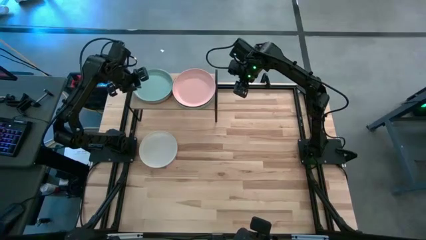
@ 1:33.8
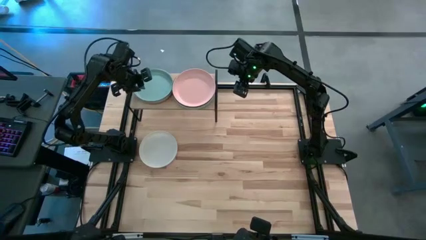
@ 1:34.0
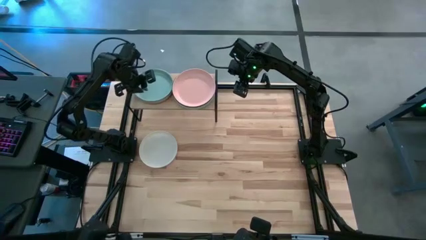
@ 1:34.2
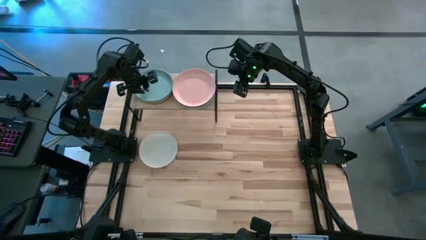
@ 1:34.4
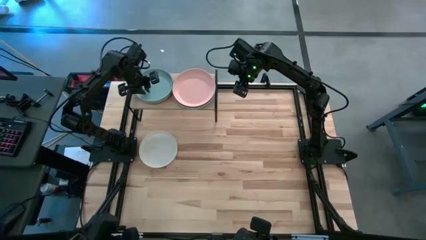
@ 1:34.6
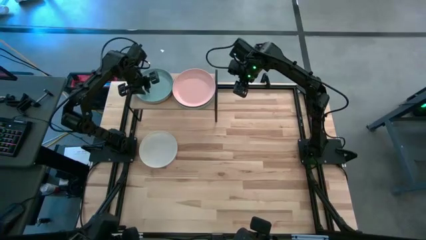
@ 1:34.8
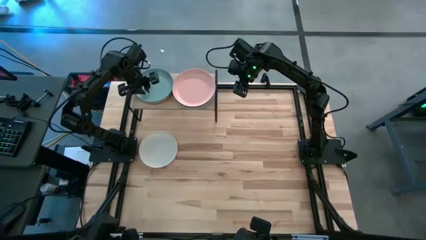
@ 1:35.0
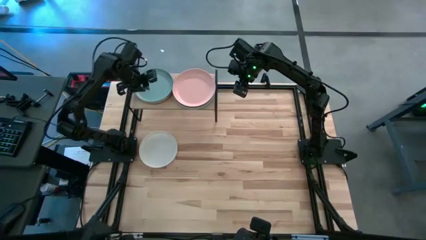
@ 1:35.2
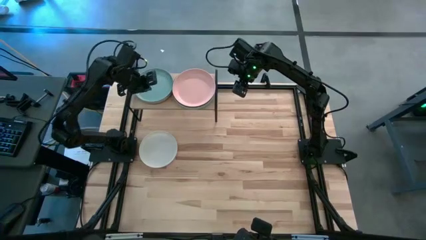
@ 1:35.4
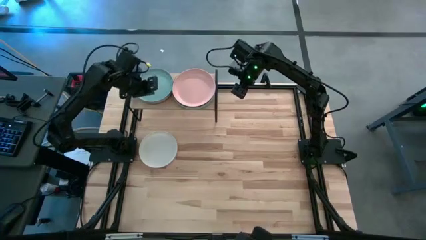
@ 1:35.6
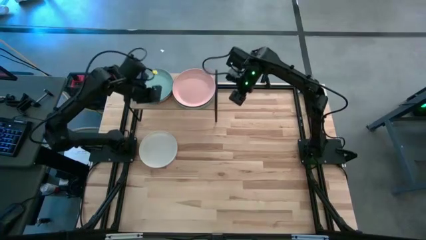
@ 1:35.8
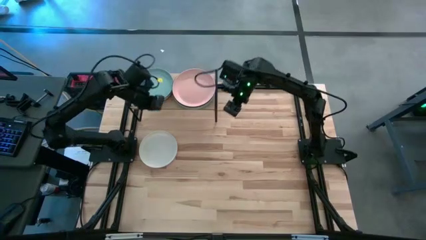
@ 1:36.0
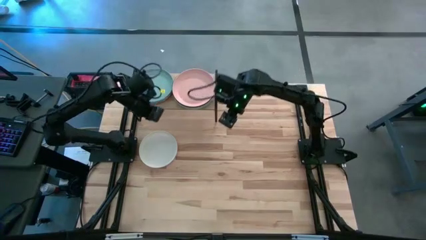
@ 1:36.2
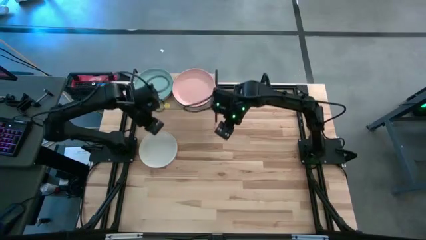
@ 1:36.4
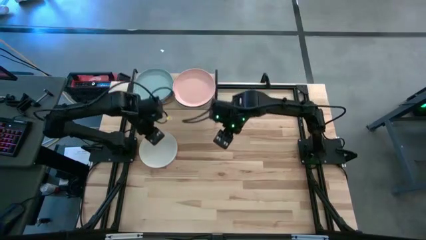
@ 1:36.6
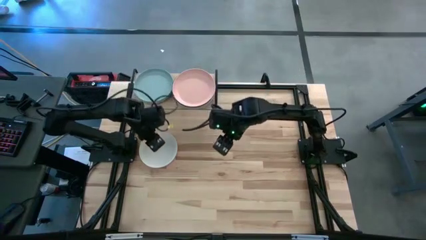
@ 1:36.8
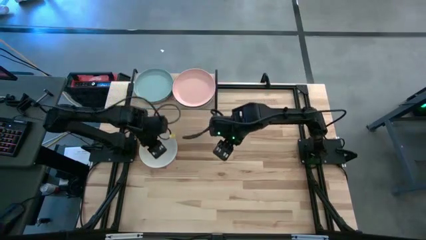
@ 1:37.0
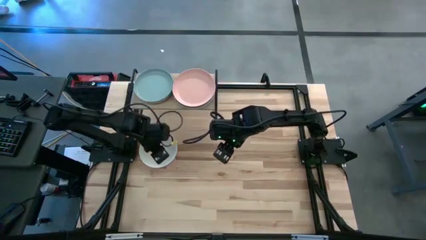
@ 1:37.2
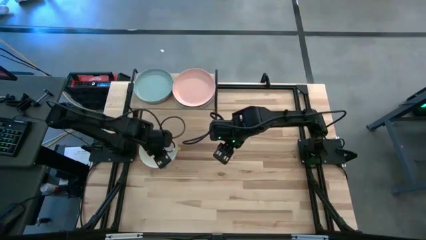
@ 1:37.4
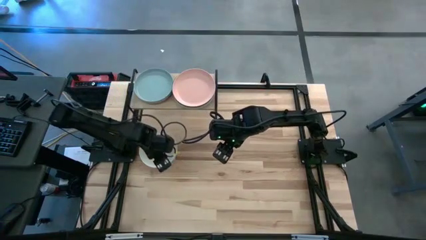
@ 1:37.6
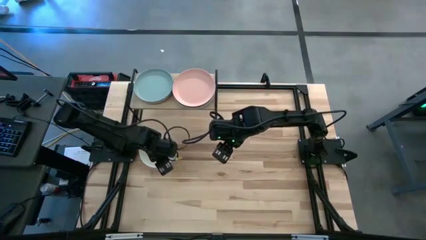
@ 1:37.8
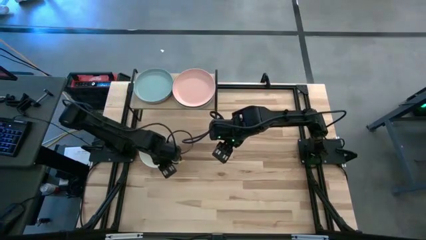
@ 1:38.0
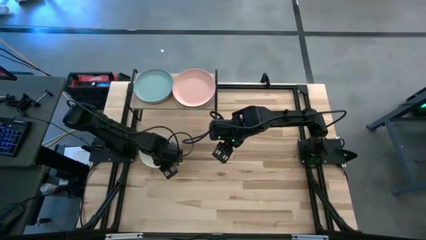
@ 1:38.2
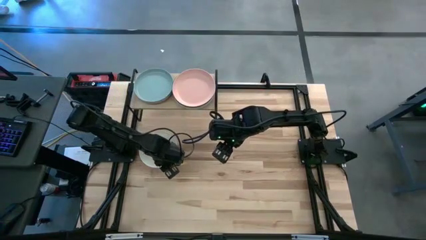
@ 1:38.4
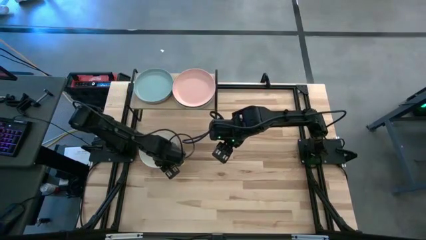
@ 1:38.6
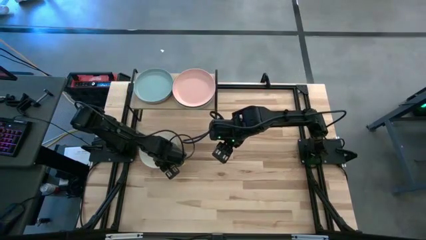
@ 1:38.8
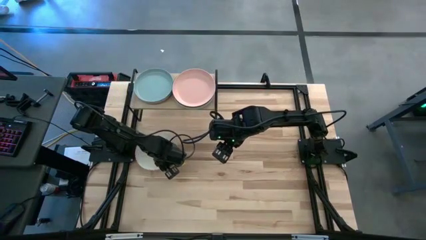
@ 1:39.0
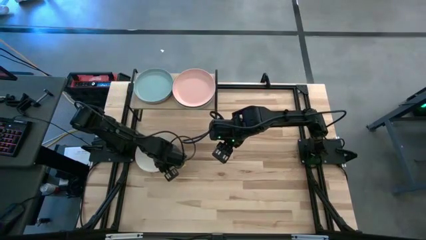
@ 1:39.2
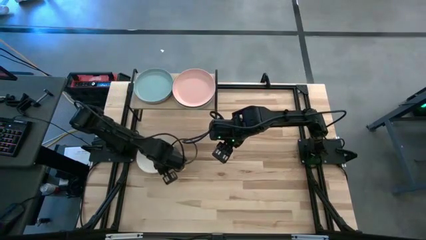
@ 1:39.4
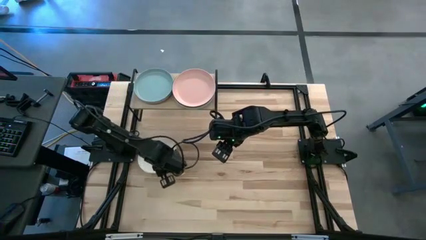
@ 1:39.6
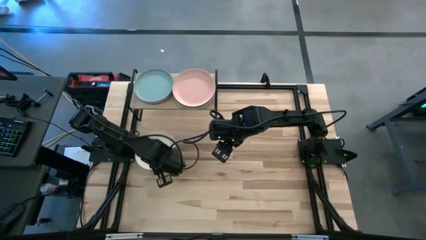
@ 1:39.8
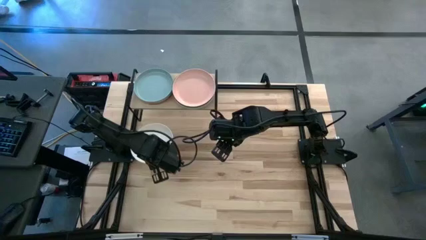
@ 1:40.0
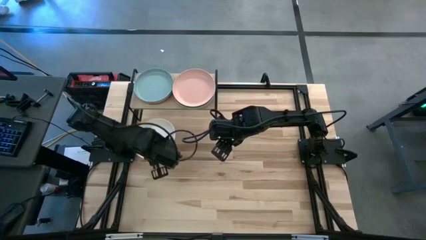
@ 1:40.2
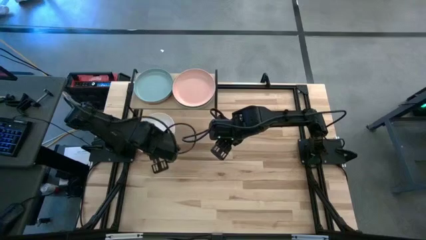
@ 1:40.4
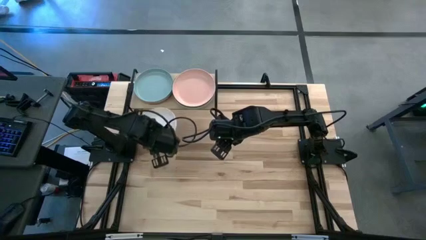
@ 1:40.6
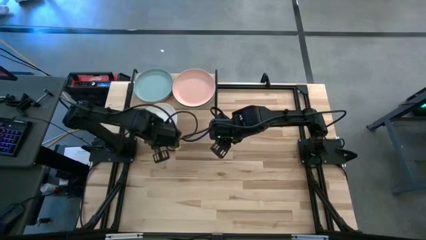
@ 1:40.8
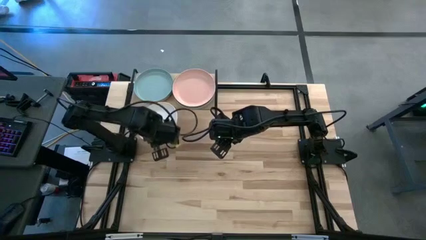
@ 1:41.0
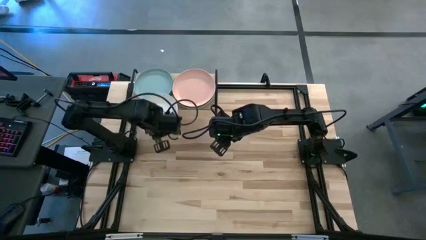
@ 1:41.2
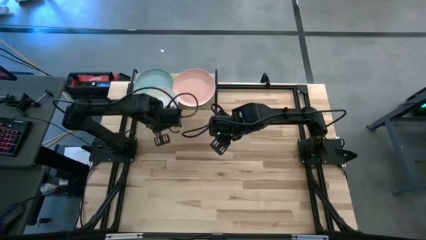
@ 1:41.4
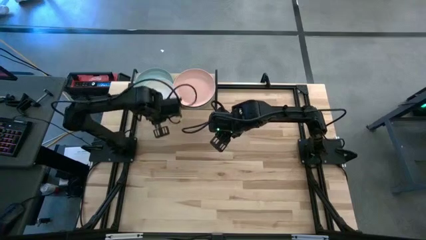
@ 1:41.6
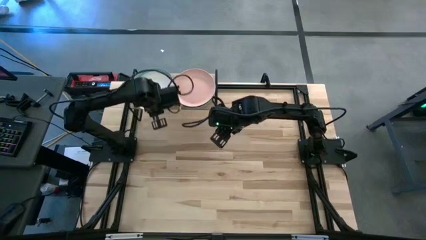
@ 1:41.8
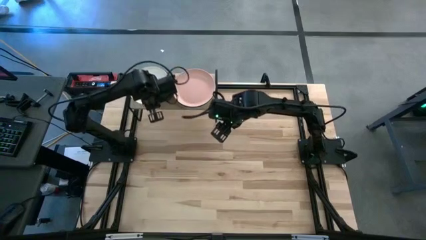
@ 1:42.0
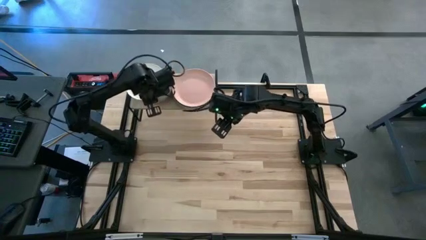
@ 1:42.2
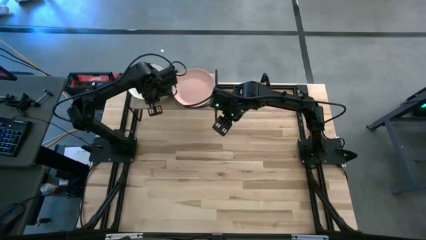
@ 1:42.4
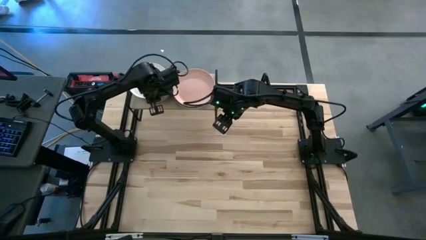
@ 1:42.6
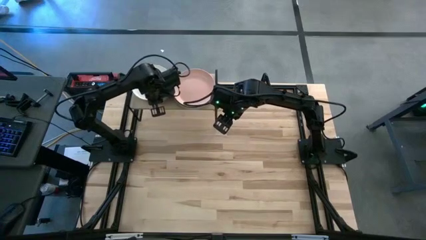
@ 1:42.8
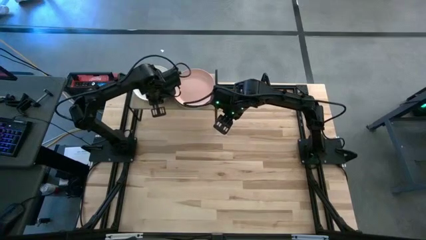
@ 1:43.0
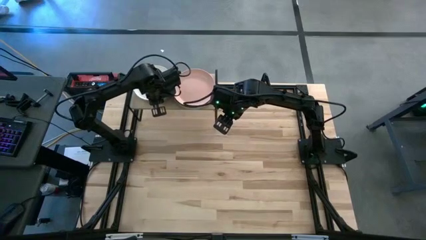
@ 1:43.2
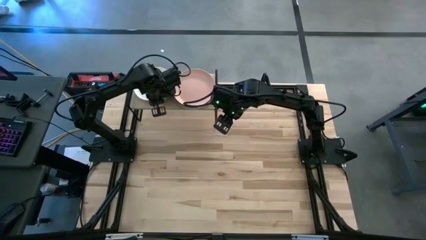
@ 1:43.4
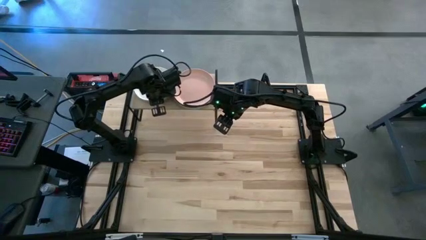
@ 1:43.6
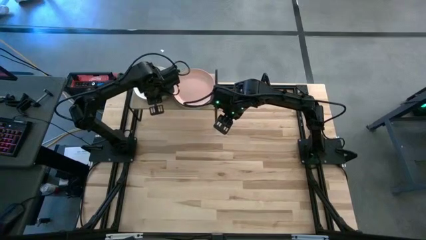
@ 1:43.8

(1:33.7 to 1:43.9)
Task: Place and stack plates onto a shelf
Stack the white plate on top of the light blue plate on the shelf

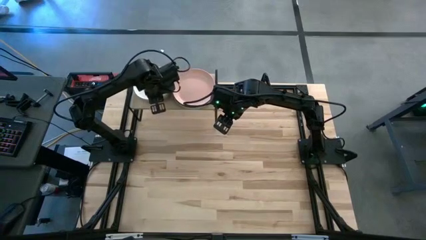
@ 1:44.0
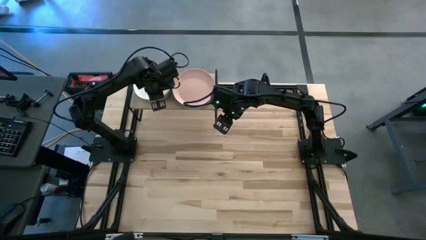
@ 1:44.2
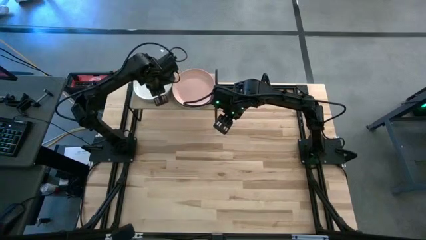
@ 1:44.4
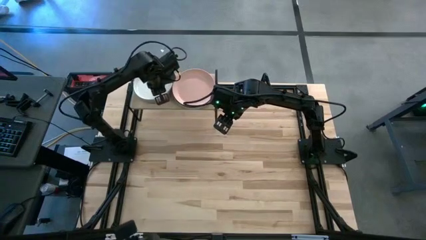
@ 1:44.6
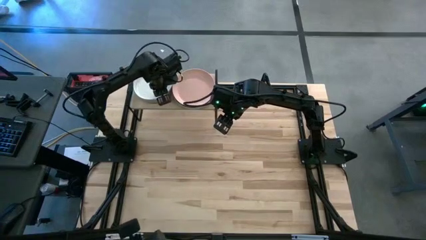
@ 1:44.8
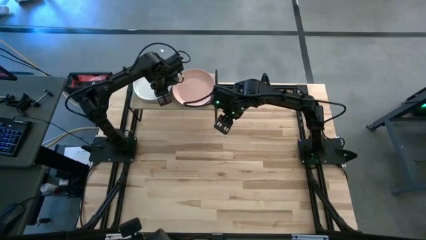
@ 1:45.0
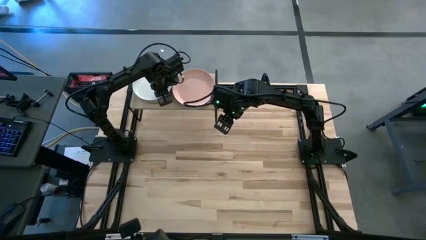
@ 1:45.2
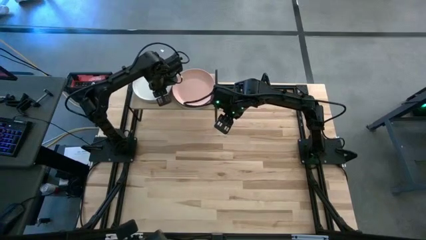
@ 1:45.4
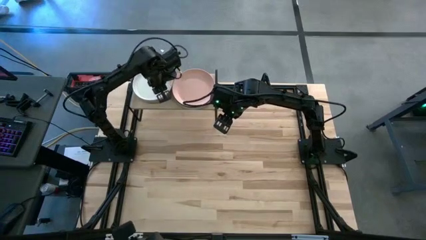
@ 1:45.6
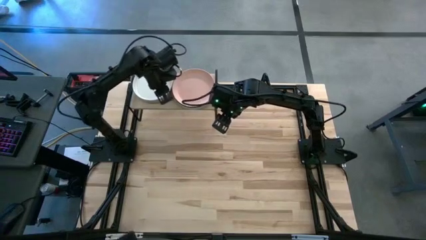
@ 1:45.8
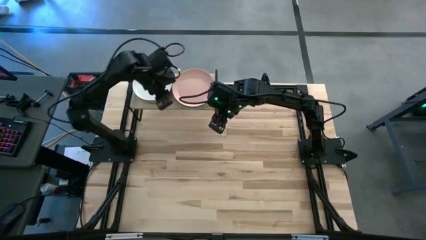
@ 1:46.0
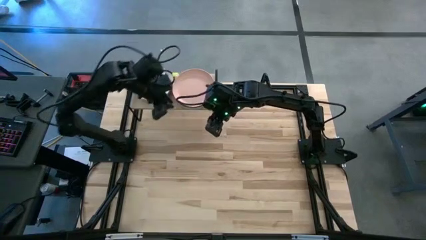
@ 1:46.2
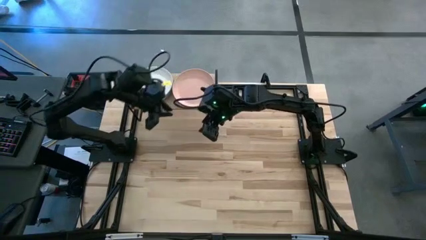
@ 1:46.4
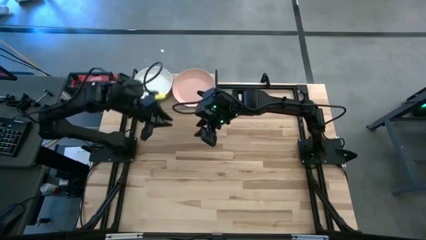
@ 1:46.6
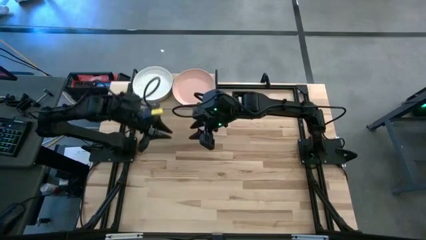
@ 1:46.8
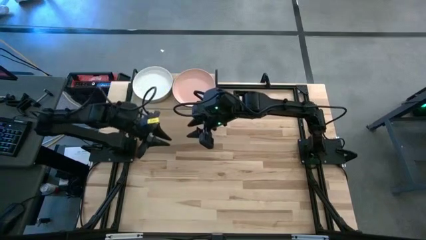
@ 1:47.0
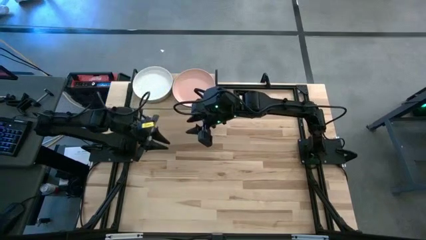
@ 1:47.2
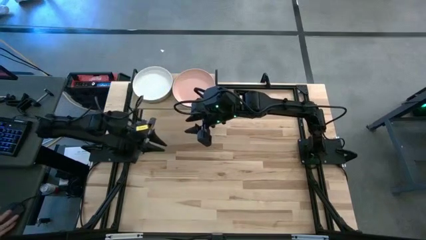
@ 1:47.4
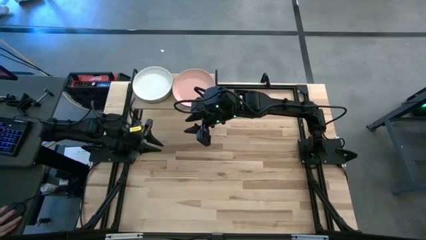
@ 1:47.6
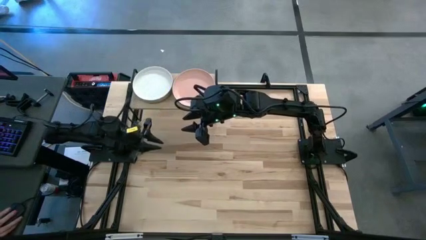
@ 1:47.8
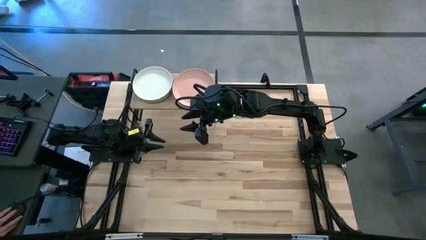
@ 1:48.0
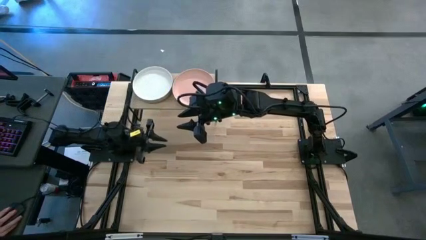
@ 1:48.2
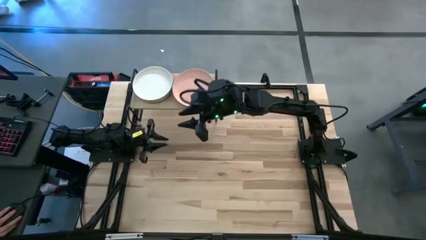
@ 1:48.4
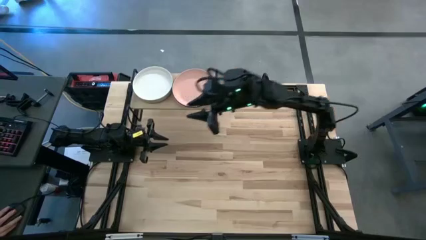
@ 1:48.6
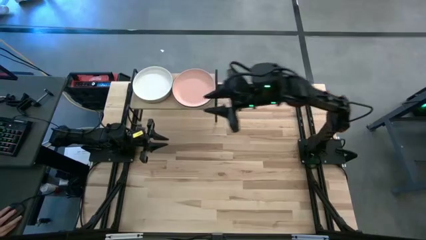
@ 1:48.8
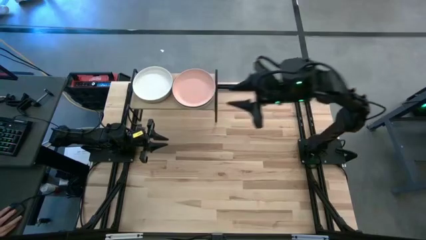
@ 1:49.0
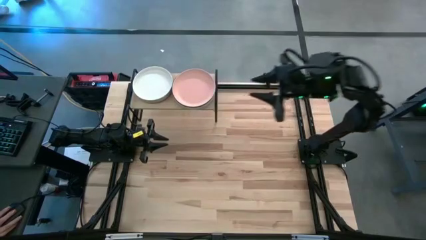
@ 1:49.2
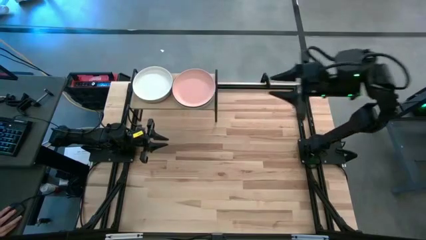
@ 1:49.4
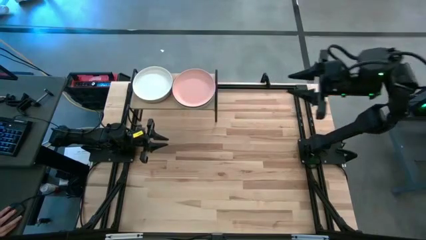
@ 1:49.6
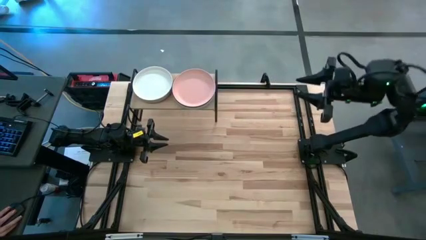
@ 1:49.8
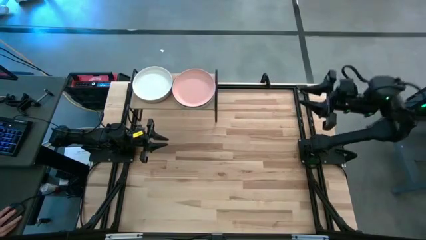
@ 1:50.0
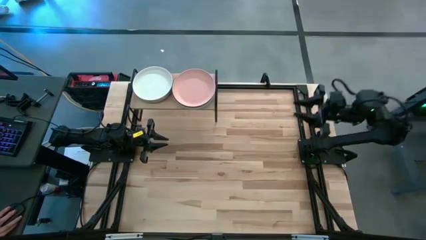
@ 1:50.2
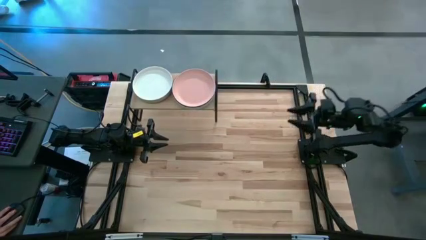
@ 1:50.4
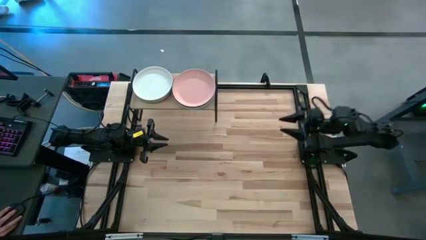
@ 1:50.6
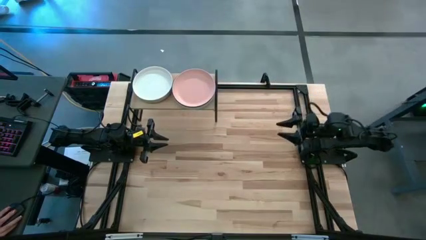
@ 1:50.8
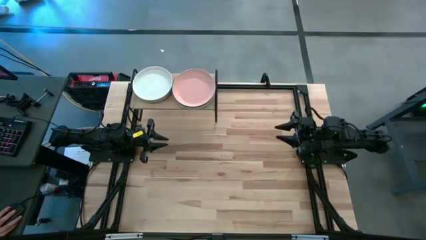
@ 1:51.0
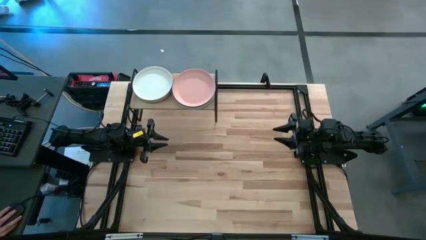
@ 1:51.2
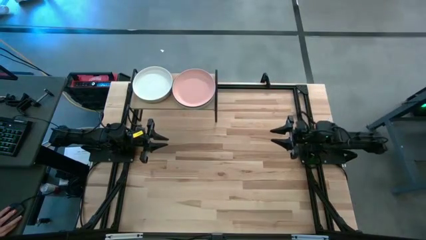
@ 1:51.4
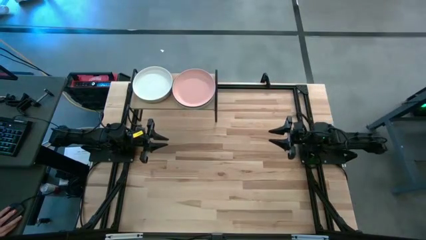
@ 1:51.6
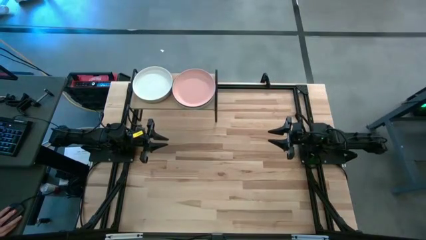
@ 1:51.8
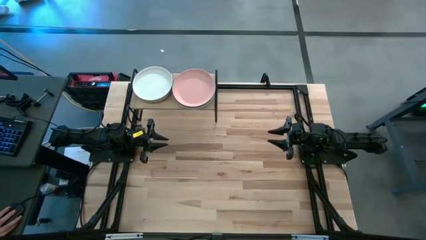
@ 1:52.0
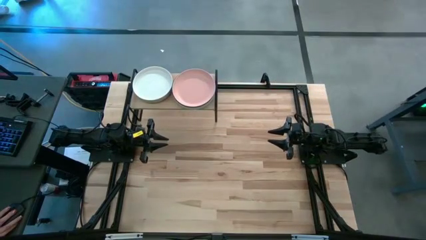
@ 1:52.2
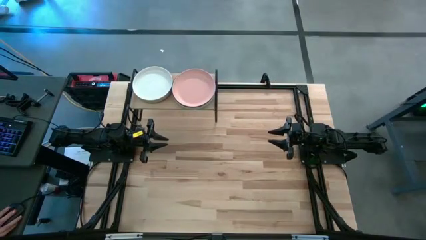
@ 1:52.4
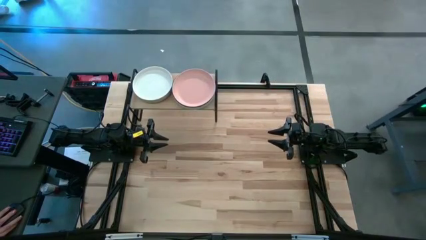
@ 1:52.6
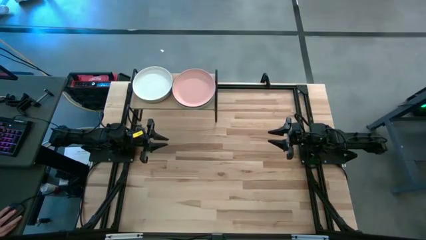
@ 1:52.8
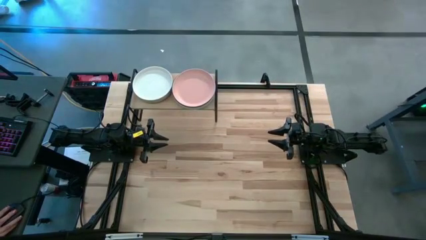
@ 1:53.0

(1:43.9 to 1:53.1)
Return to Home Position
